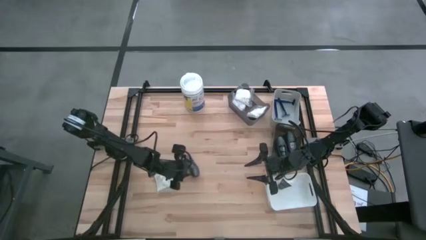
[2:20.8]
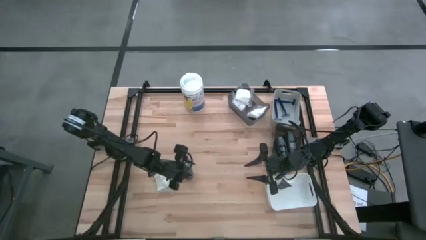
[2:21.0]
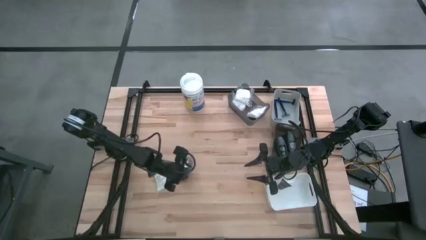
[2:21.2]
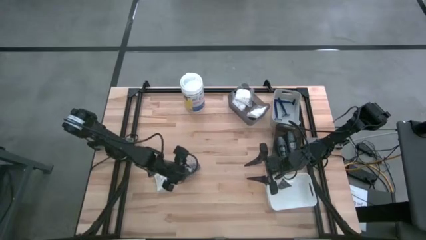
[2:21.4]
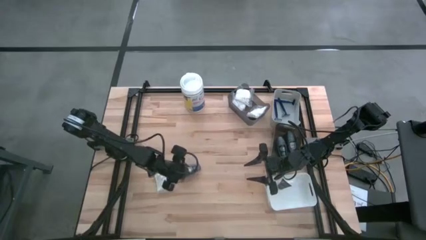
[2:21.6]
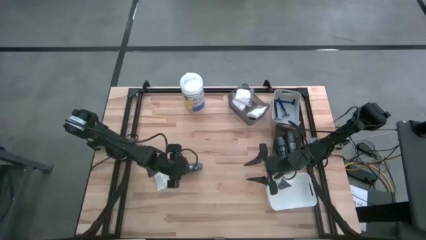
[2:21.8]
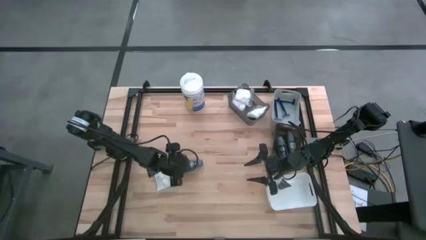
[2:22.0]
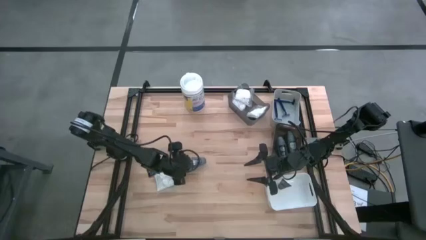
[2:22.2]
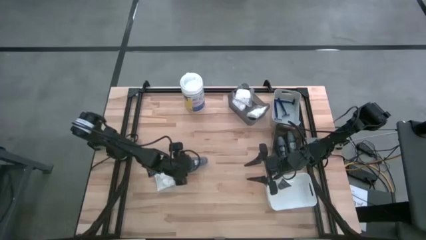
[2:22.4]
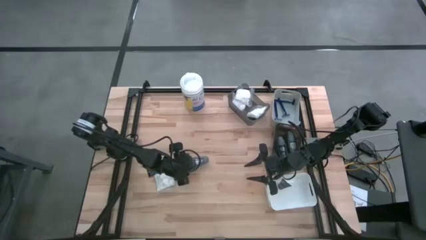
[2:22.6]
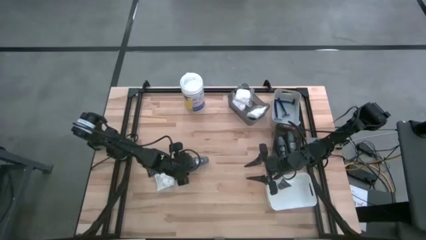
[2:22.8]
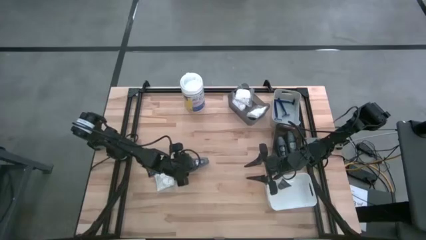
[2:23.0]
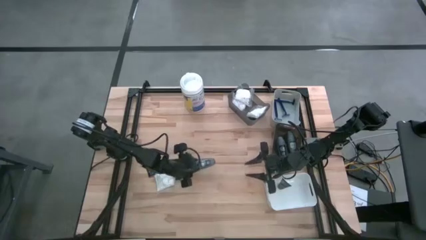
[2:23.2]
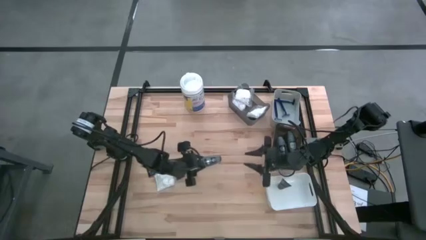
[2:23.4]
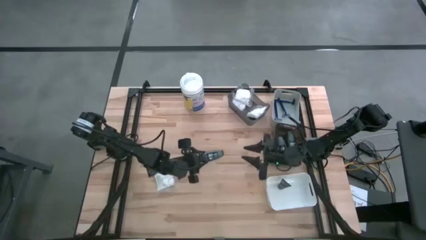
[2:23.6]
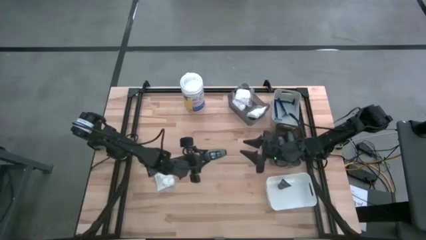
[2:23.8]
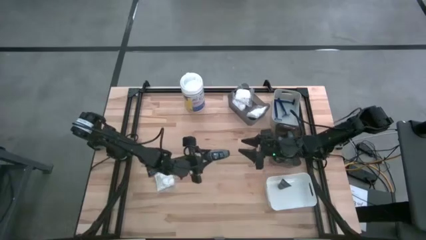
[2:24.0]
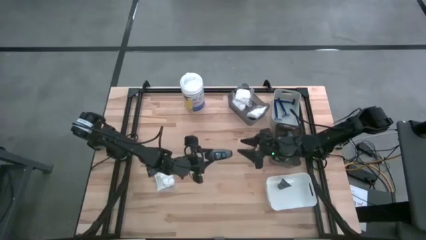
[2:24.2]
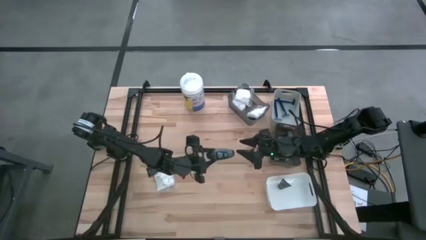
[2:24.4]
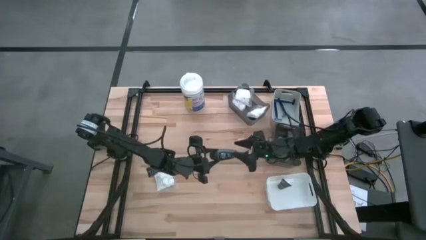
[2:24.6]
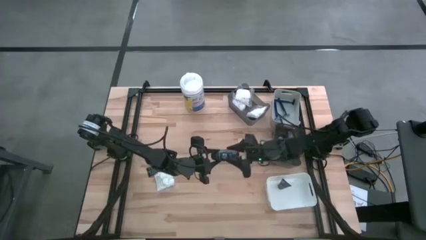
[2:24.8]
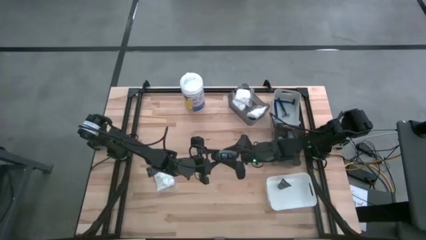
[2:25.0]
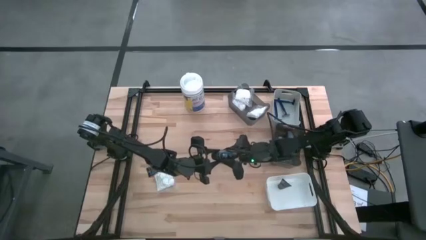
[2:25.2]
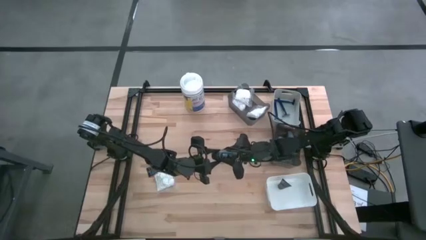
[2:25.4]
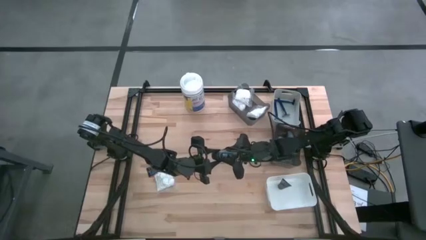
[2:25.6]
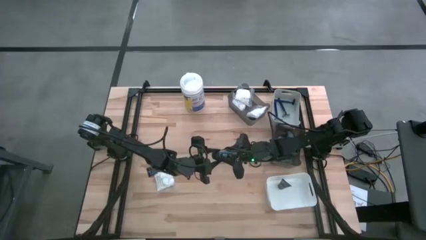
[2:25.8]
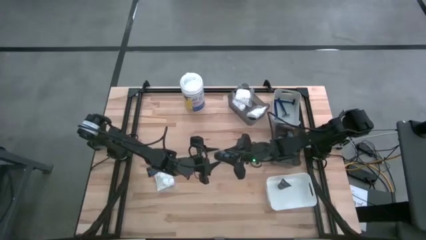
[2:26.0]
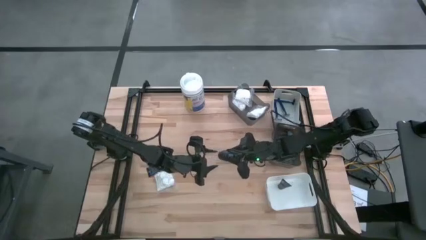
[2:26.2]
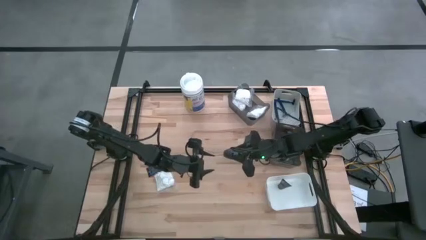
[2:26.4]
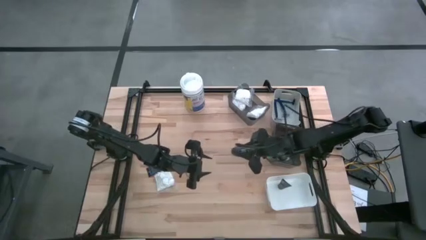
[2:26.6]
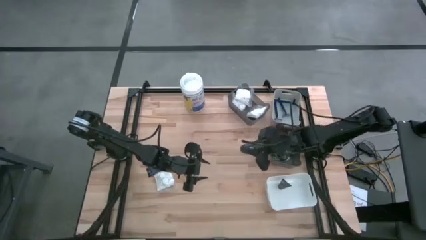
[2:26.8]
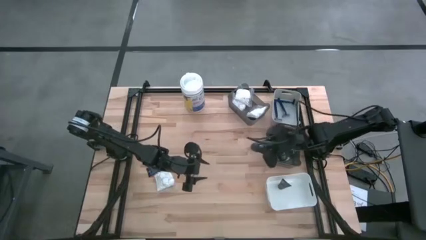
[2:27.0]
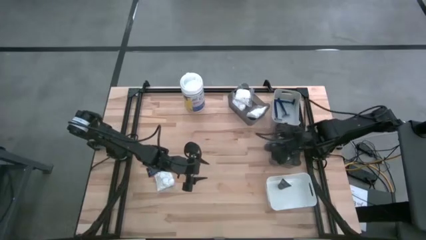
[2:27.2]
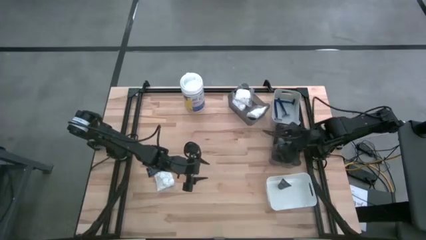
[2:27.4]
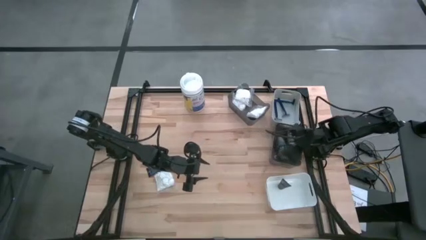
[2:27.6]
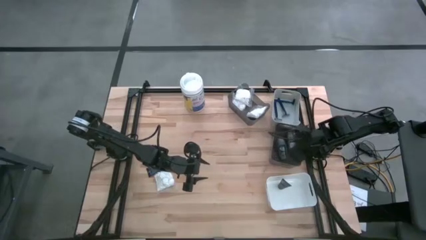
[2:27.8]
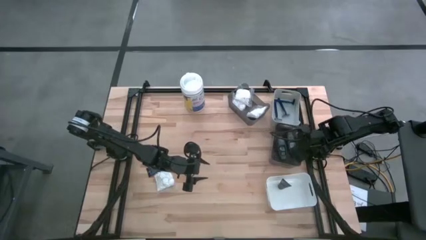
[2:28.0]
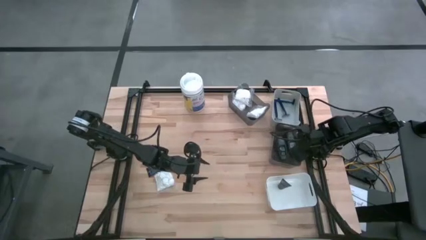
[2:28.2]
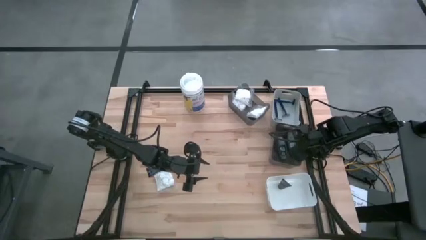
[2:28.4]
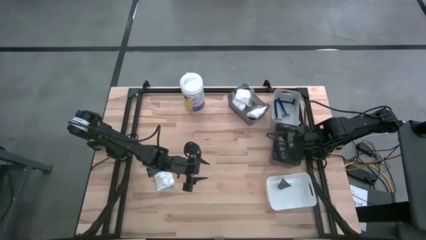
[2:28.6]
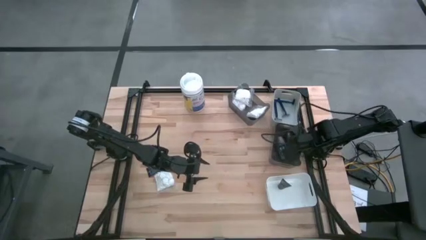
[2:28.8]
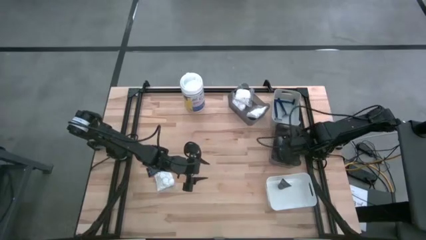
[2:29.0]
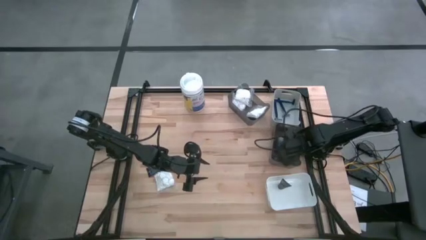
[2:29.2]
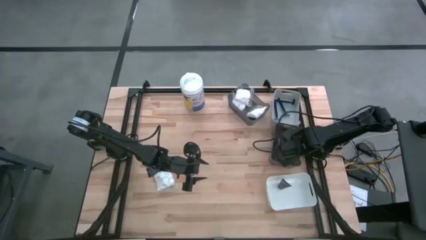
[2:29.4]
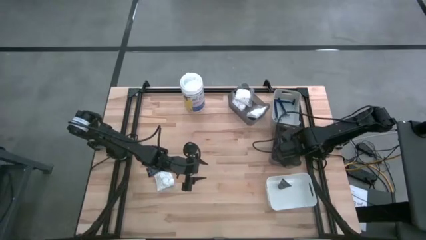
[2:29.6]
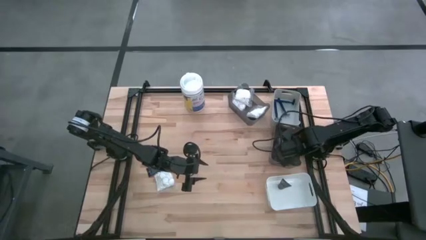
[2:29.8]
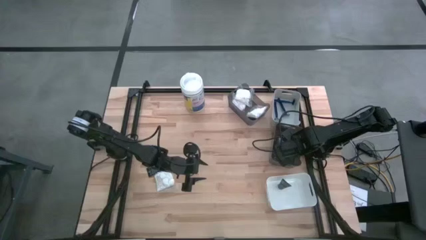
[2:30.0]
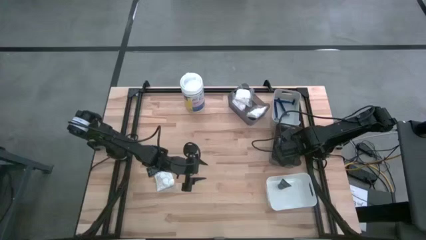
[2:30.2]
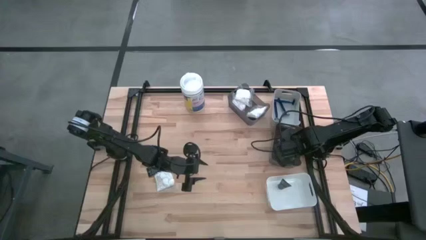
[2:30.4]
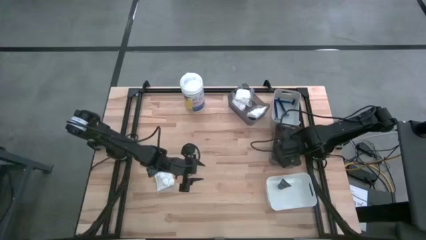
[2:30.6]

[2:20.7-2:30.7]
Task: Pick & Place Travel size toiletries
Put the gray deodorant into the bottom black bin

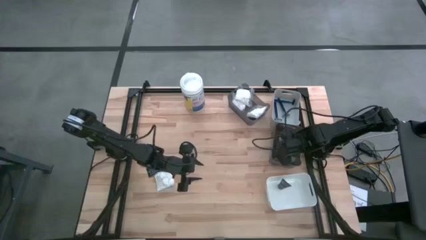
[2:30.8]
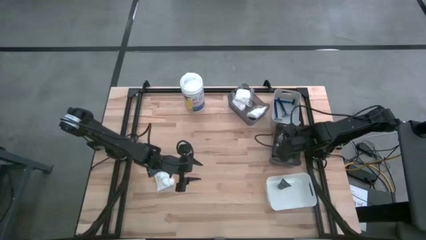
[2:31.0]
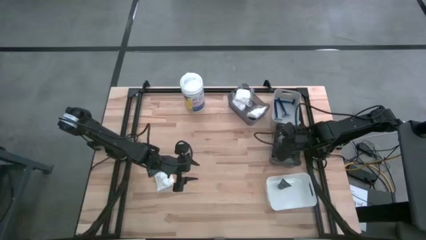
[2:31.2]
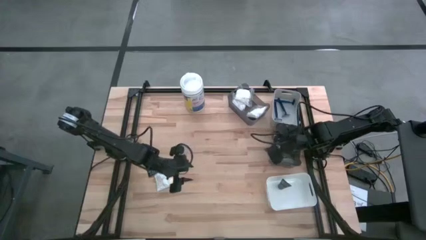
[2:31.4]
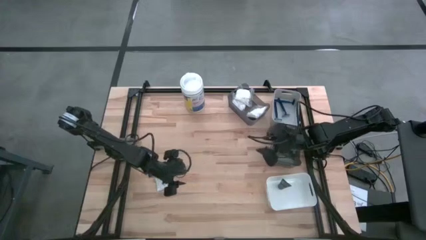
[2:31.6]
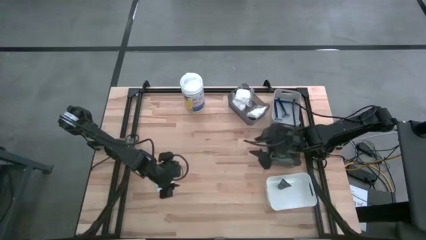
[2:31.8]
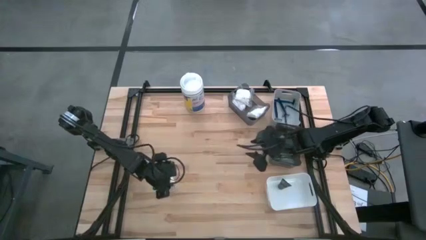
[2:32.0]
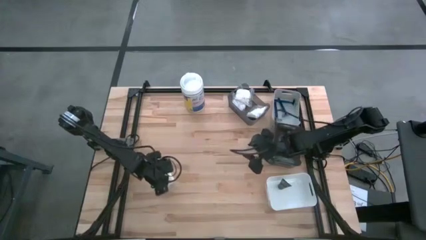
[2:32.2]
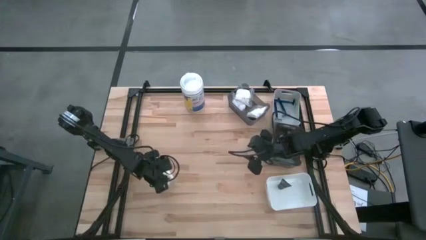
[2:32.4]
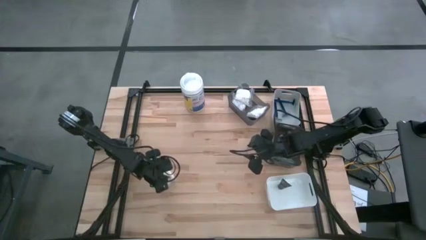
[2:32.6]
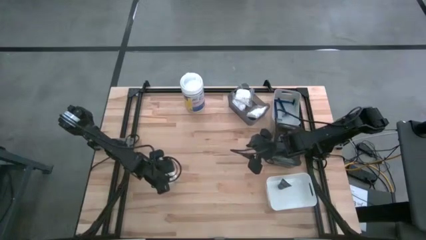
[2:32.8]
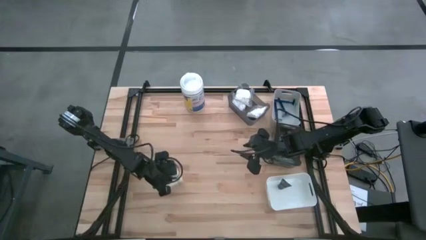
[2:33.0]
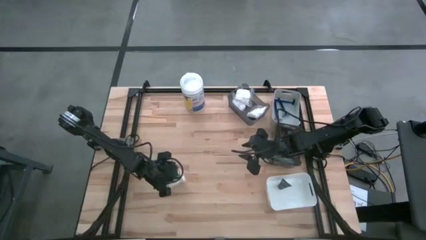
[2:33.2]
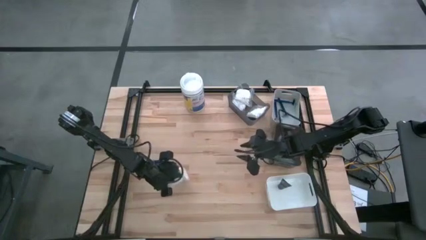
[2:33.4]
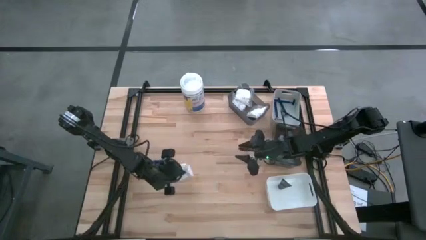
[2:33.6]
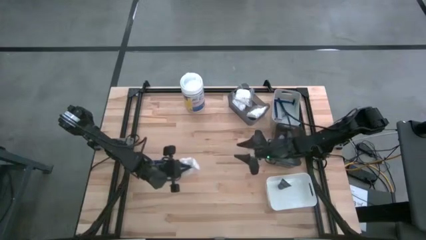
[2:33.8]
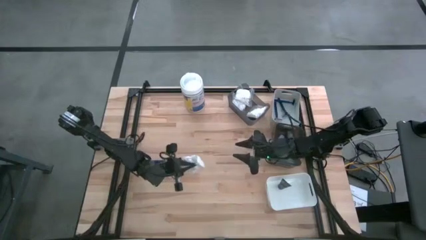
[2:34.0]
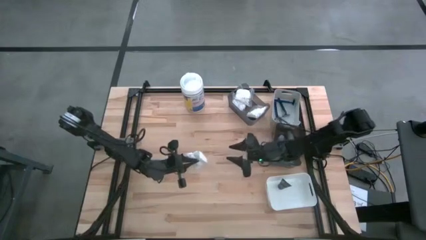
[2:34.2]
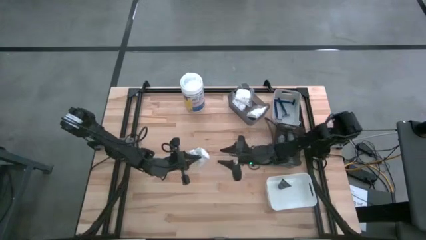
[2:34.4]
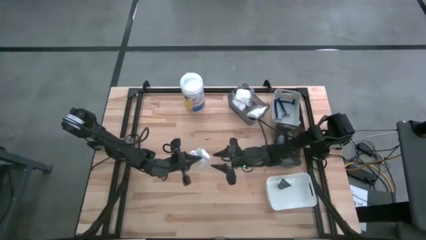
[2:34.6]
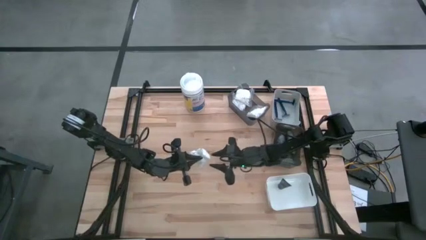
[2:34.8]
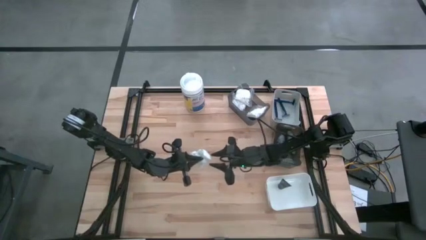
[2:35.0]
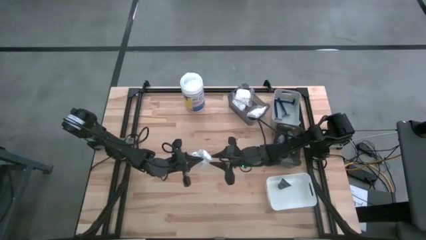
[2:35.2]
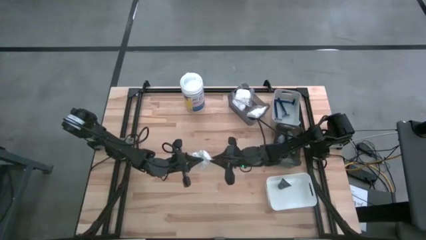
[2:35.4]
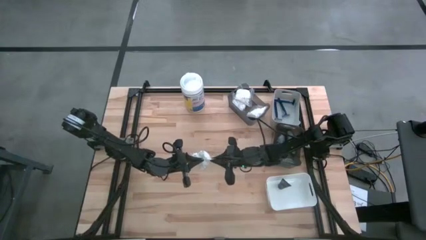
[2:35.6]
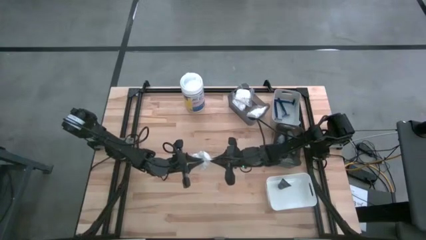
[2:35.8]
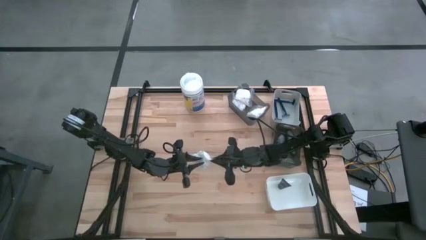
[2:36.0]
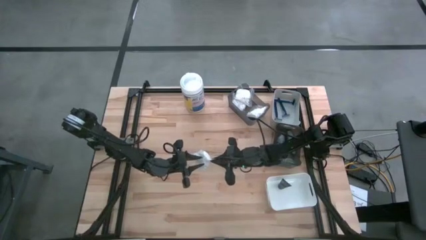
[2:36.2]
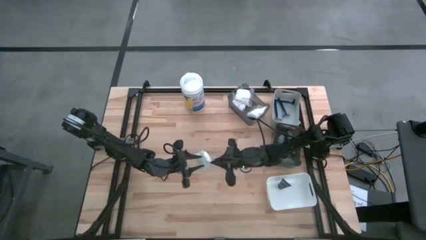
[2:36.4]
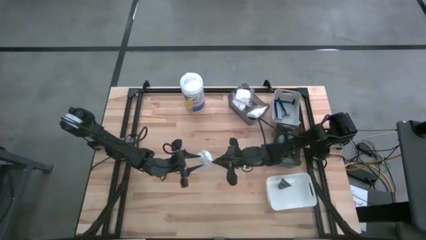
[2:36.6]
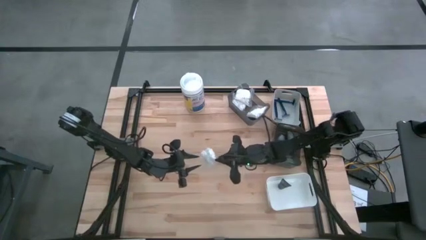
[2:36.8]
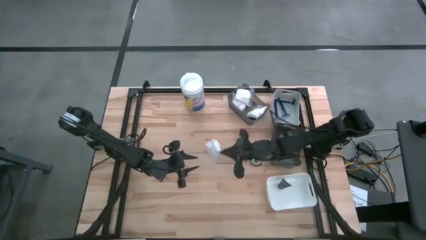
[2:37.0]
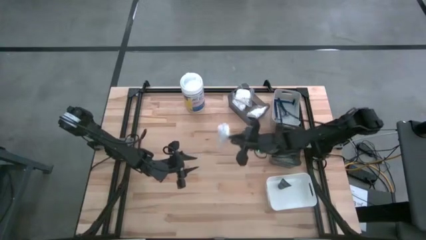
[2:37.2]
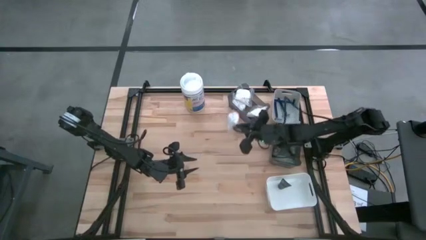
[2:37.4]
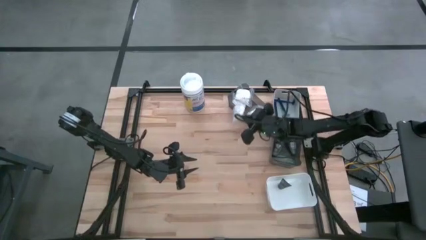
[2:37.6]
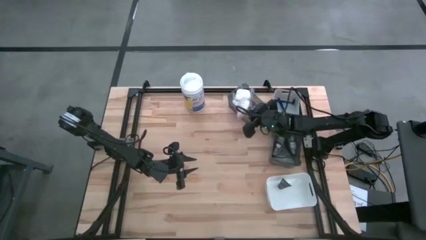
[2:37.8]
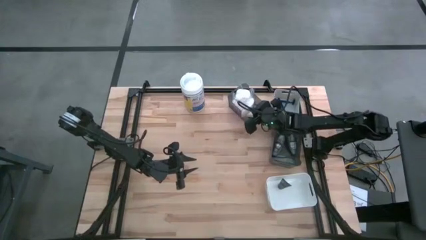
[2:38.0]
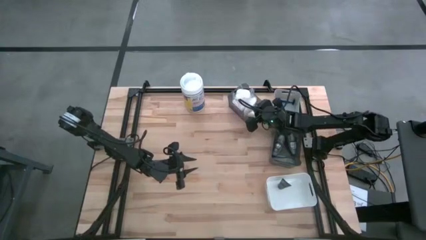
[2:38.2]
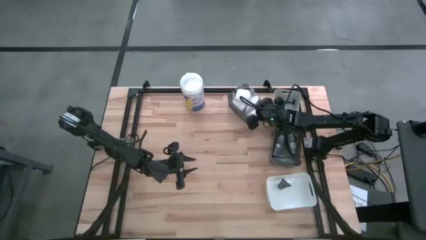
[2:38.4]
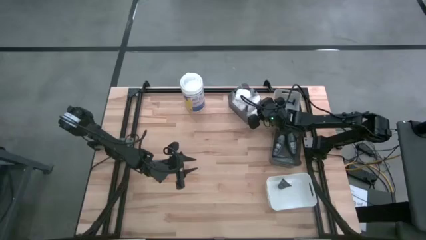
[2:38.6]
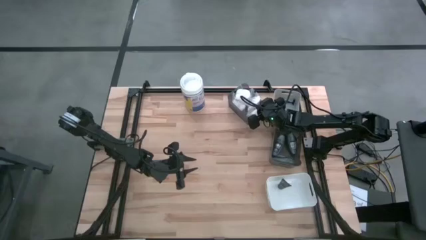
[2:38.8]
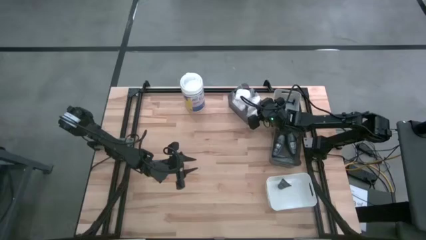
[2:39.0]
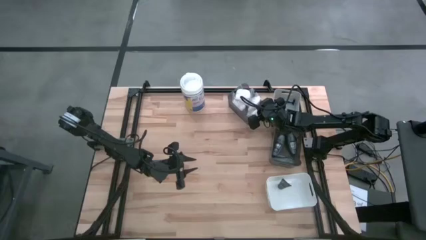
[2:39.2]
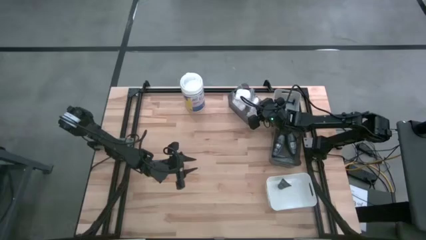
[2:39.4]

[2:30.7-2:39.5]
Put the white cotton pack into the top black bin
